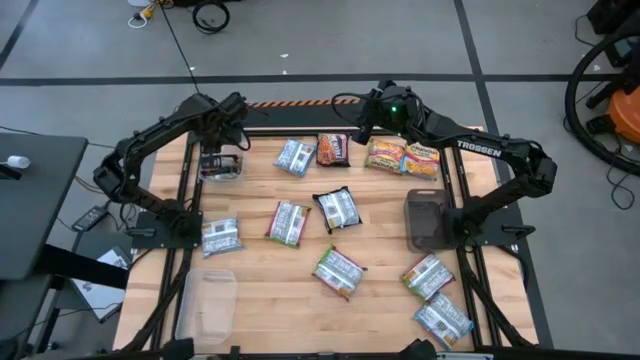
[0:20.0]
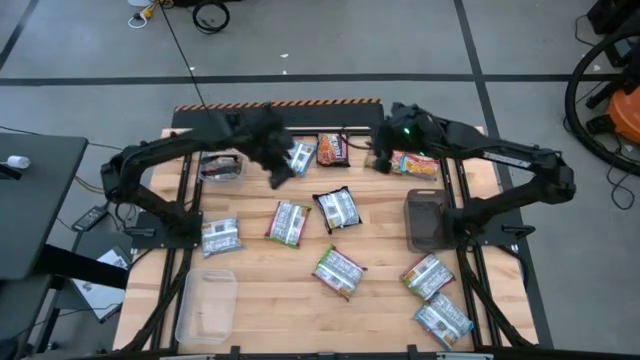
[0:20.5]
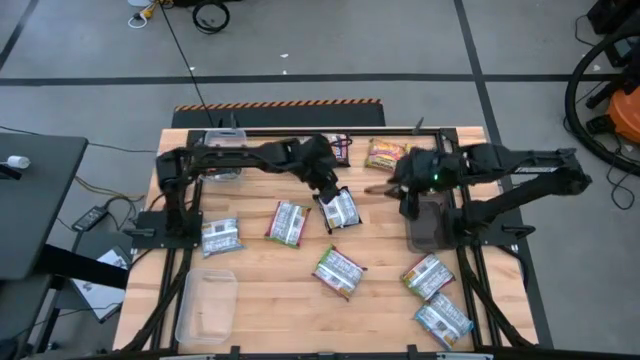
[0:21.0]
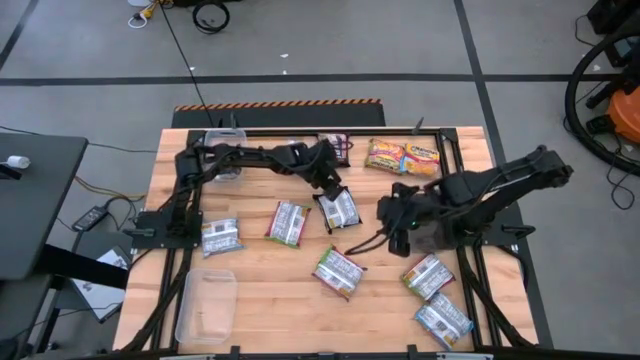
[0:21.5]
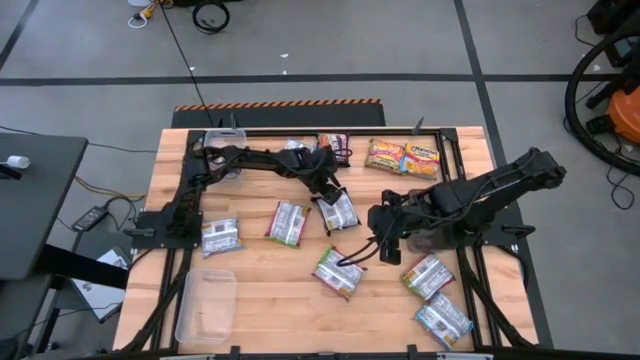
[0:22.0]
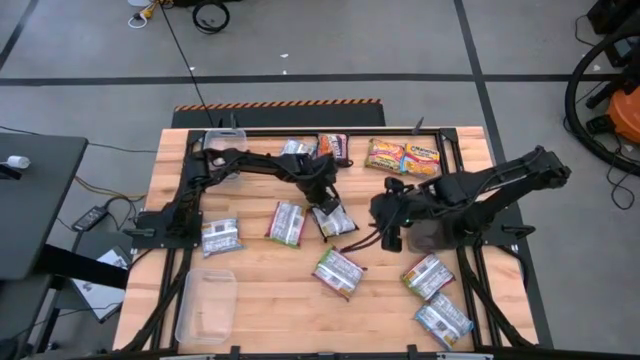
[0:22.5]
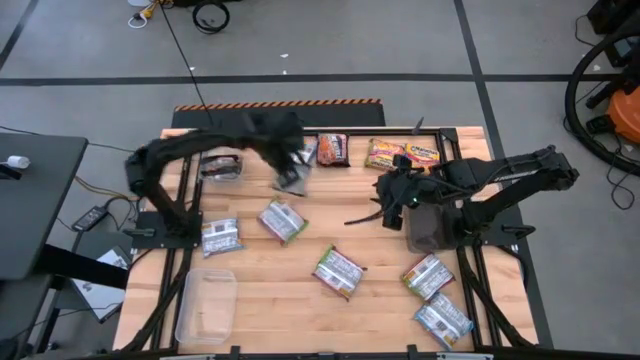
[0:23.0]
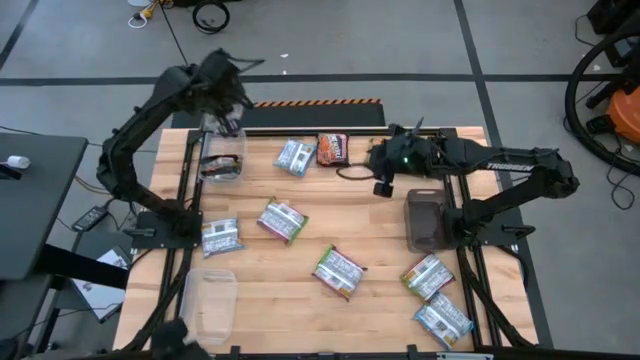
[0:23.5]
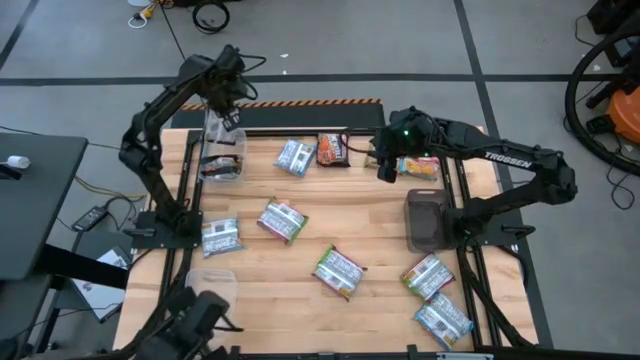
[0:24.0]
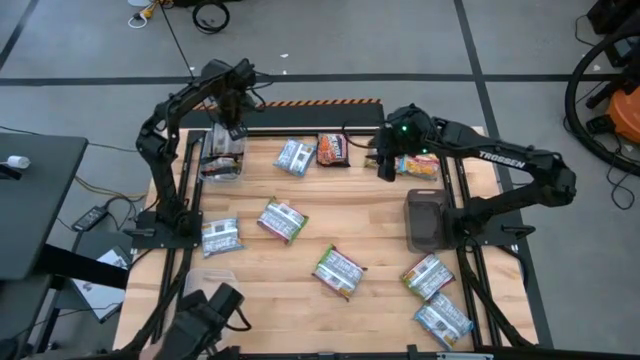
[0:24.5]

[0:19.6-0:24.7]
Task: Sort Maruchan noodles
Put the black noodle pack into the top transparent bin

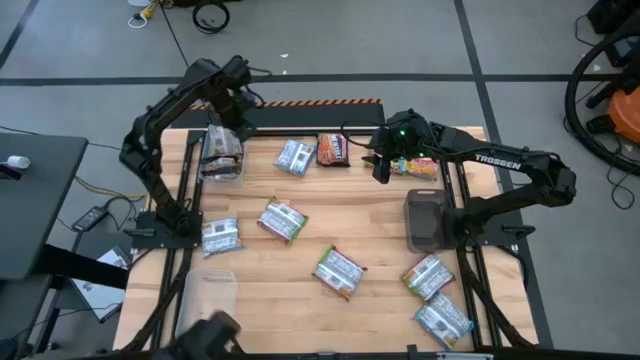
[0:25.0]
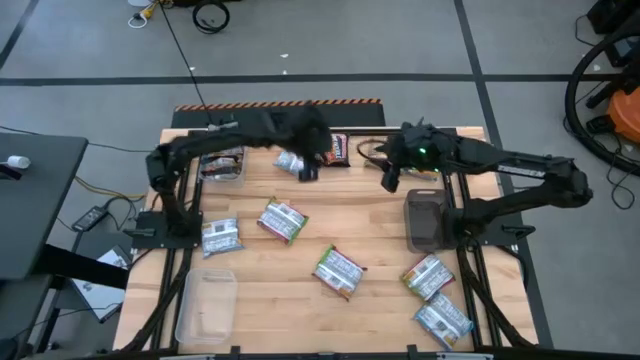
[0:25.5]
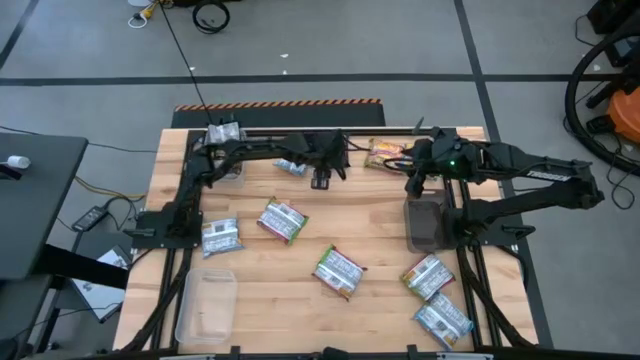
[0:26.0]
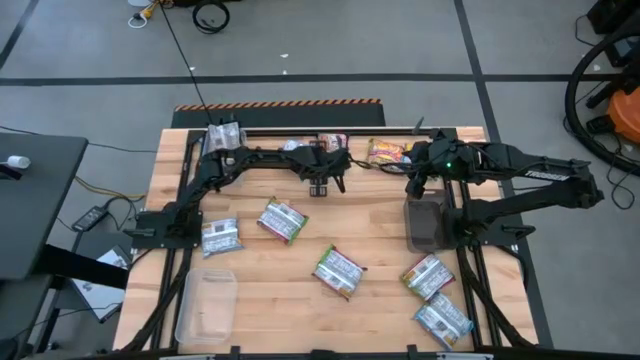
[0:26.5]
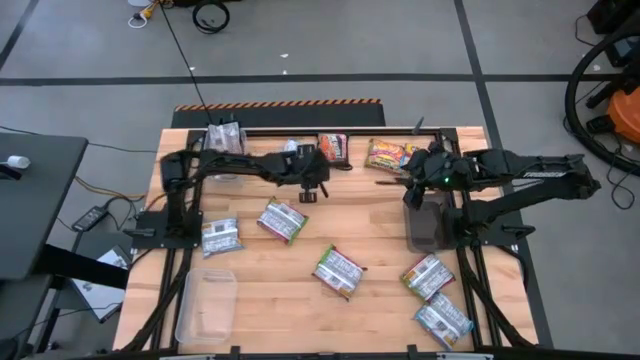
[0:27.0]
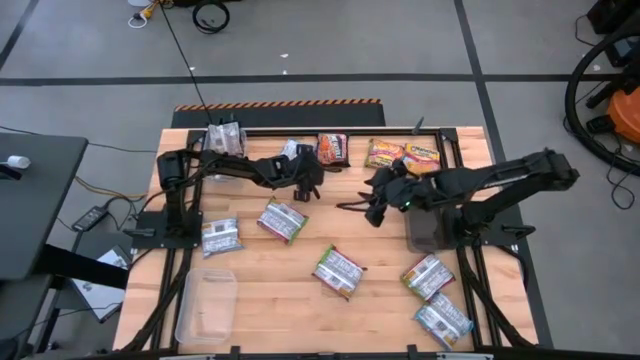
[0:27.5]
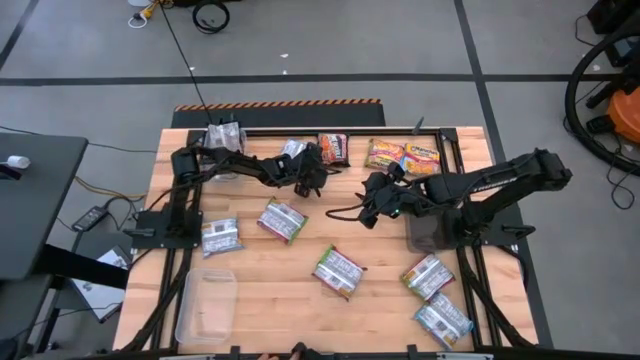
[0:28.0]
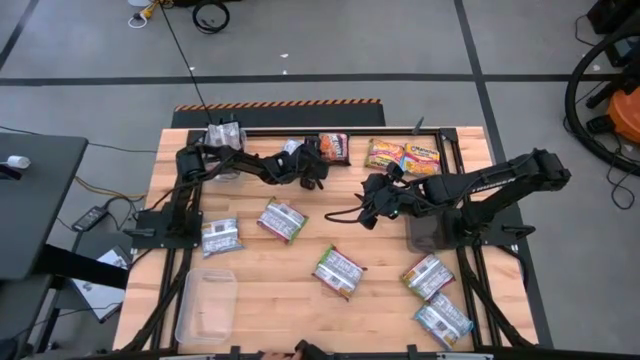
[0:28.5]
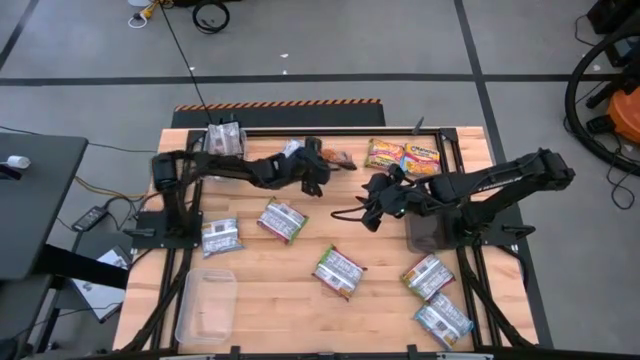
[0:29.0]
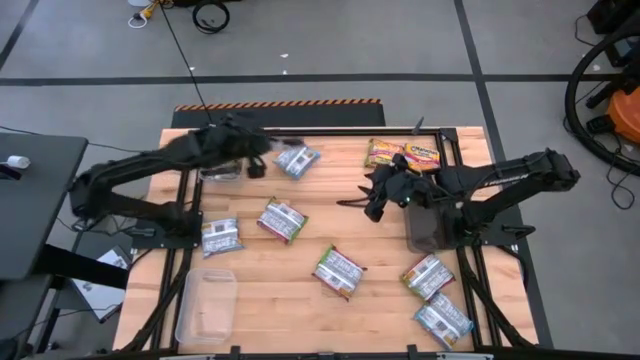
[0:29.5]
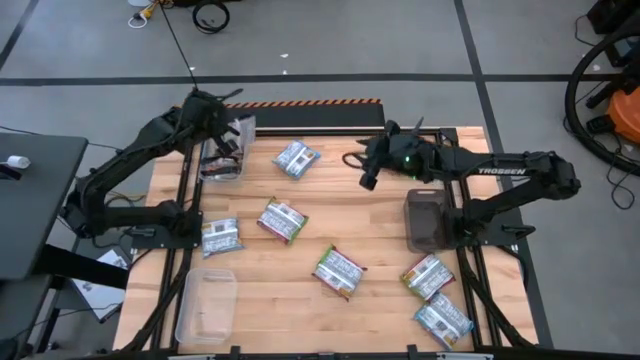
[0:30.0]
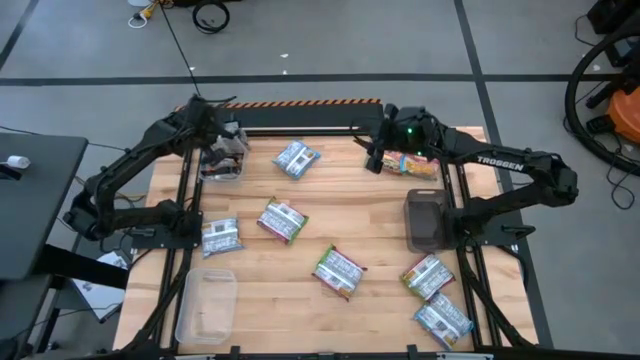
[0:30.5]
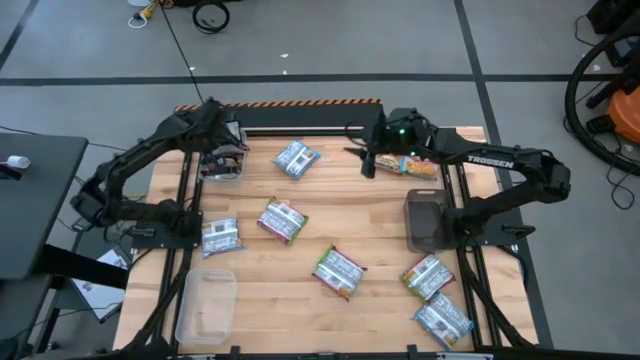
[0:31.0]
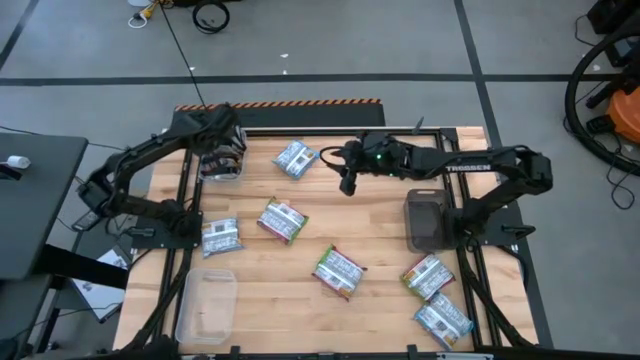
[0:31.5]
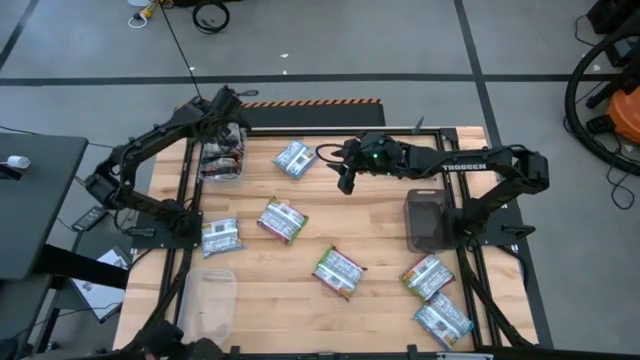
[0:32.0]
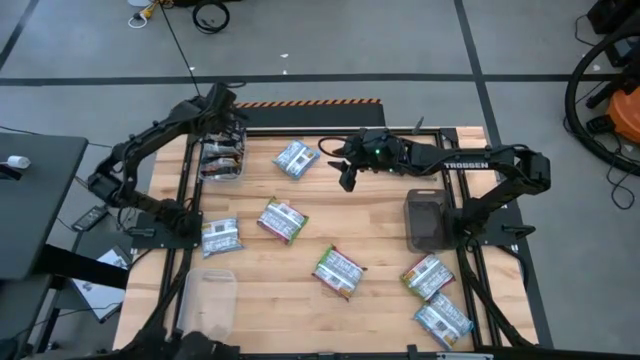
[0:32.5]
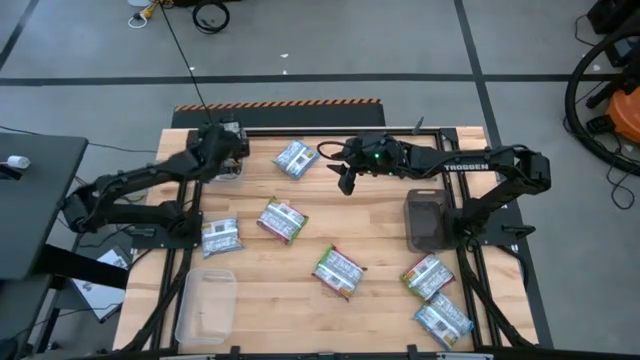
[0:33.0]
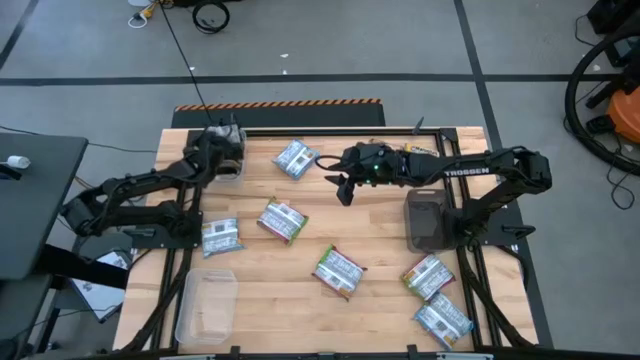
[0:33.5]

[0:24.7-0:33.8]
Put the black noodle pack into the top transparent bin

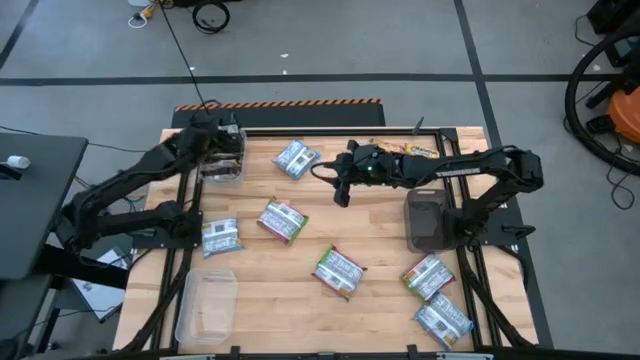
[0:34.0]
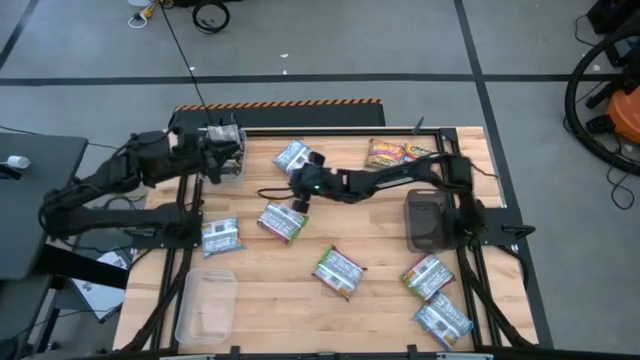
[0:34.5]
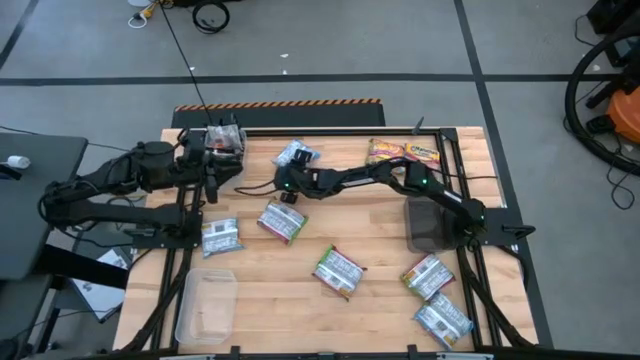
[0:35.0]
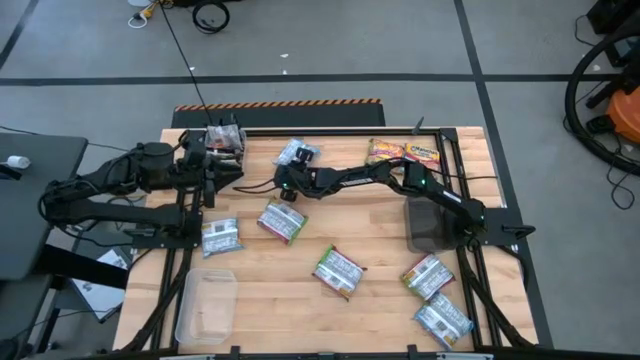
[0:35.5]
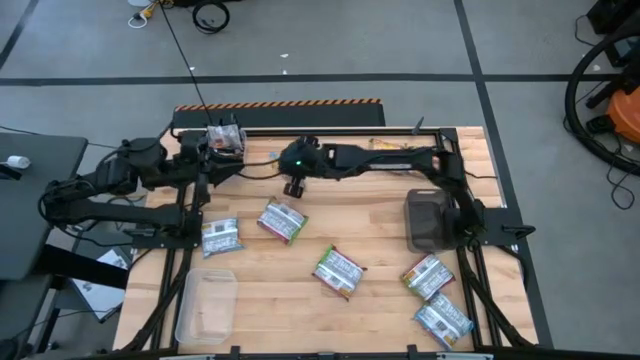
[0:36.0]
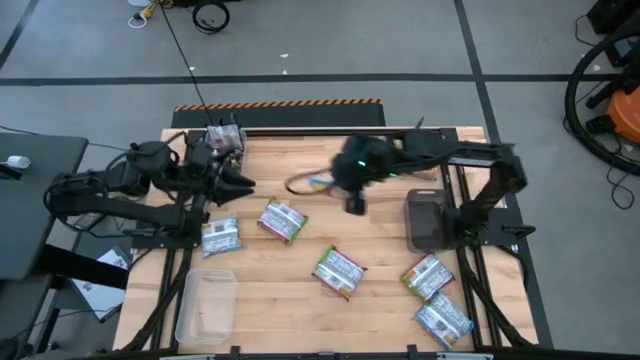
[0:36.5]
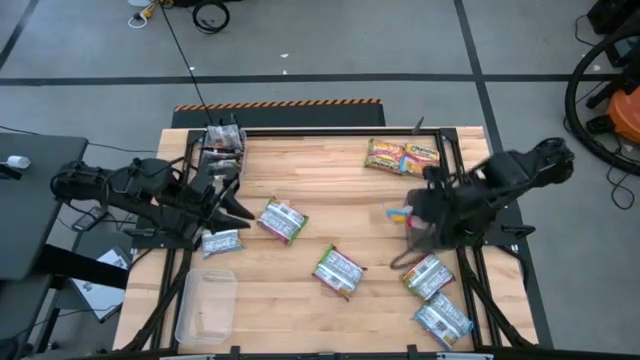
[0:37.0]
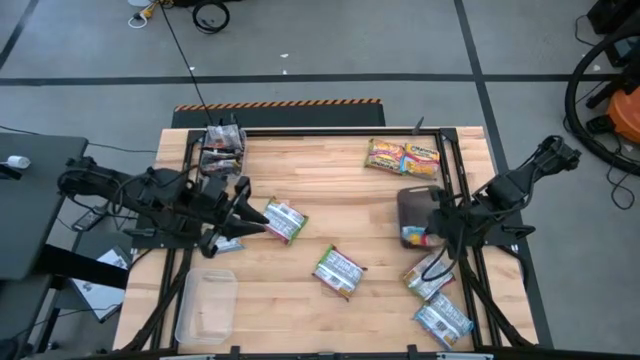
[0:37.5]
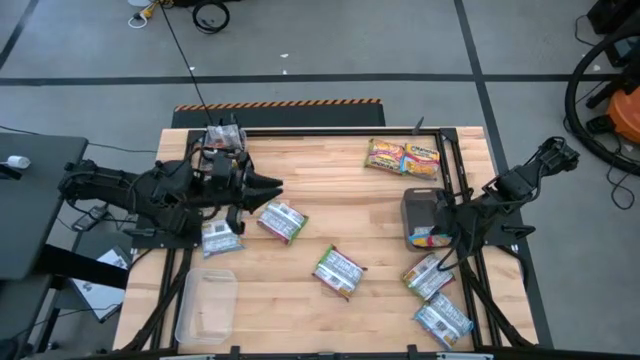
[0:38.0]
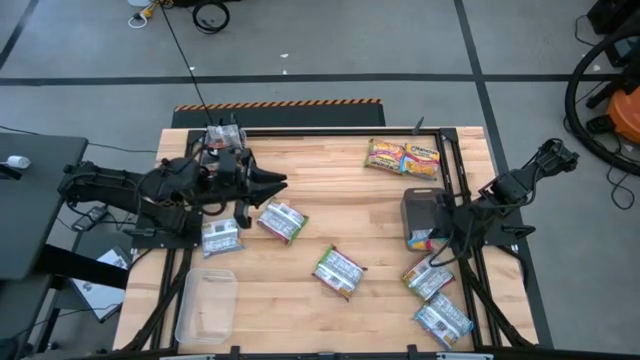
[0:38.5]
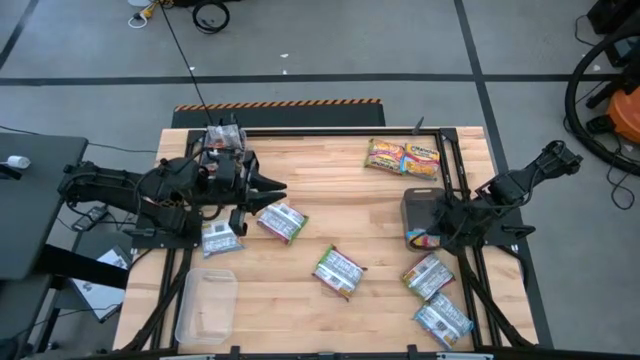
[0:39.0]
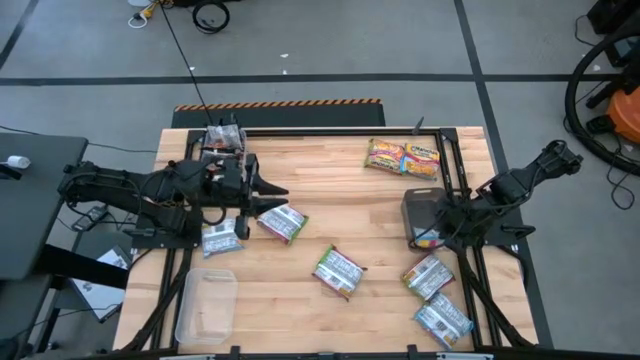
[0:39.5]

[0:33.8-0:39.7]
Put the blue noodle pack into the black bin

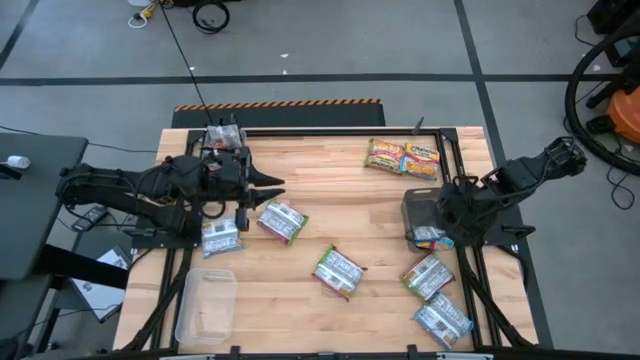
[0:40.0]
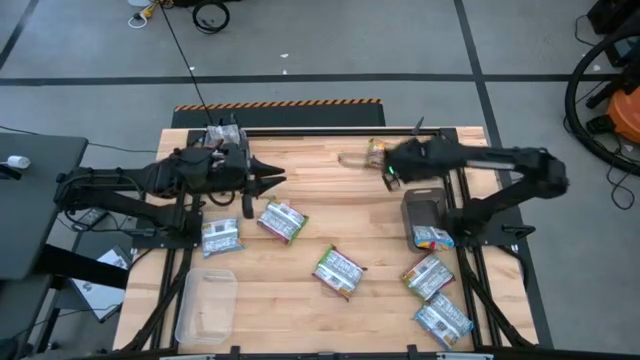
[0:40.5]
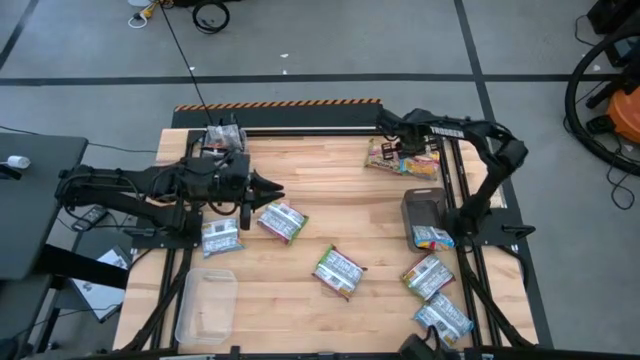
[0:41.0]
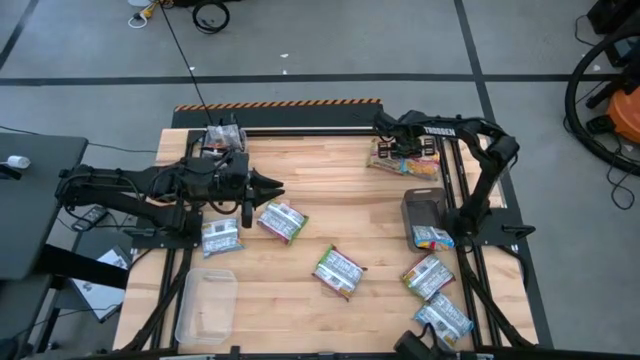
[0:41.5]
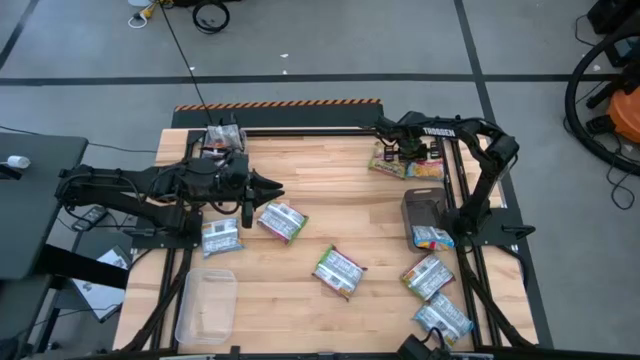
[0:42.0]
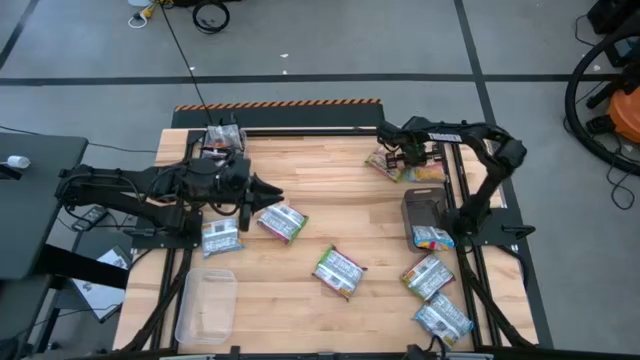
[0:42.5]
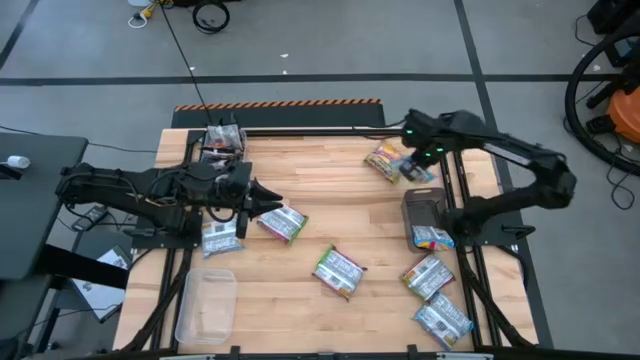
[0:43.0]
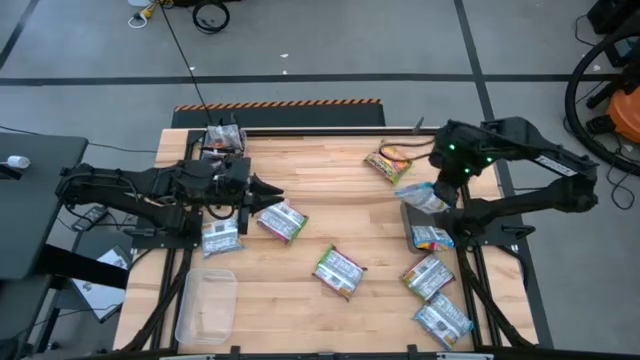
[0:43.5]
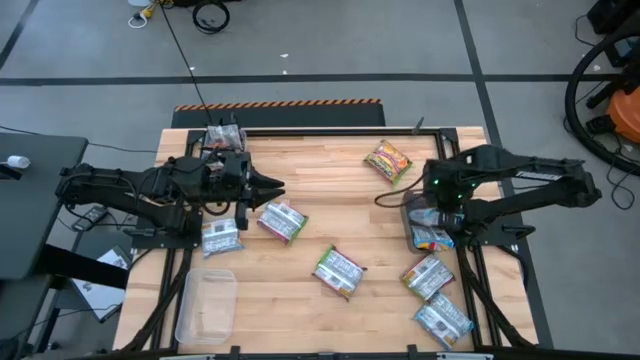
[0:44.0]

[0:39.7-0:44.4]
Put the blue noodle pack into the black bin
